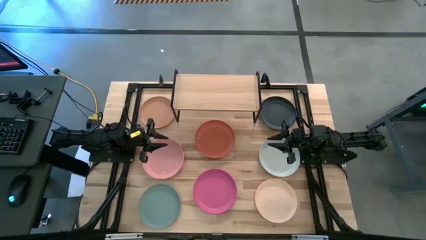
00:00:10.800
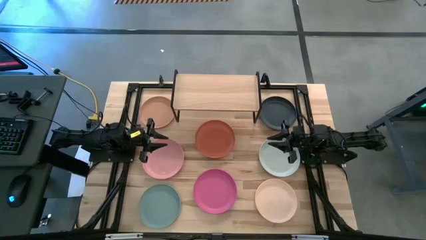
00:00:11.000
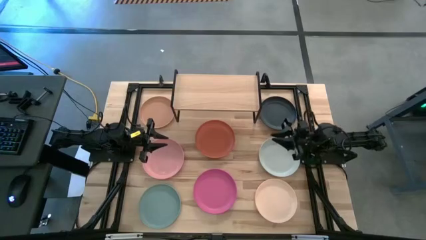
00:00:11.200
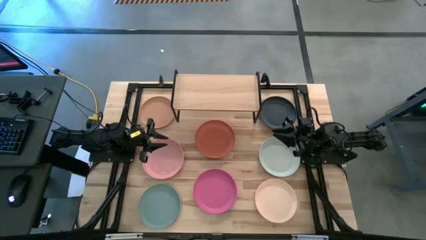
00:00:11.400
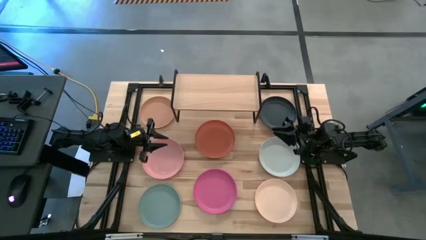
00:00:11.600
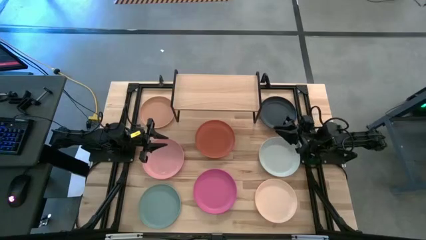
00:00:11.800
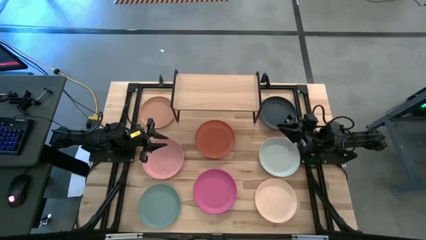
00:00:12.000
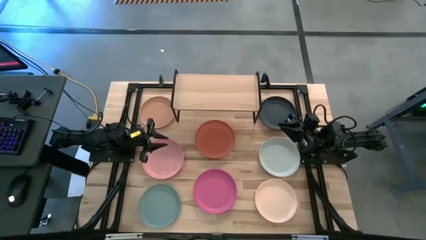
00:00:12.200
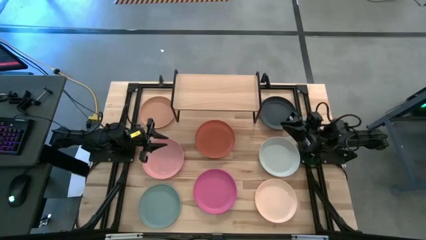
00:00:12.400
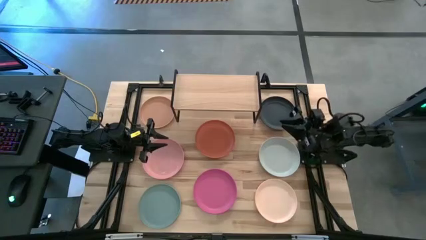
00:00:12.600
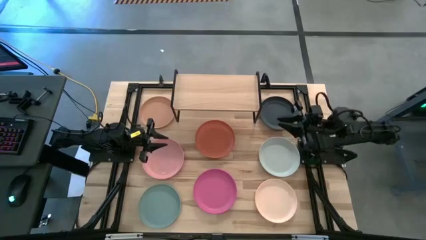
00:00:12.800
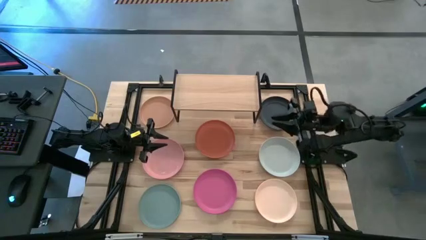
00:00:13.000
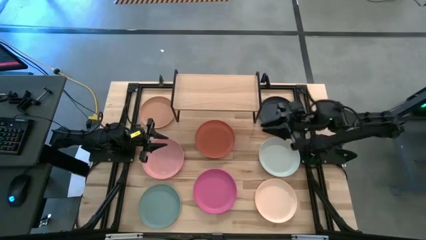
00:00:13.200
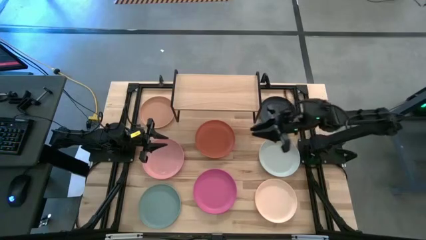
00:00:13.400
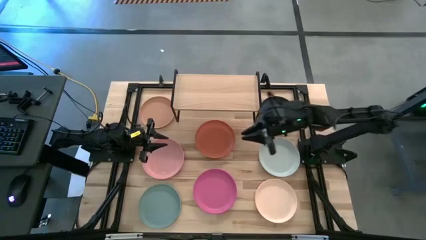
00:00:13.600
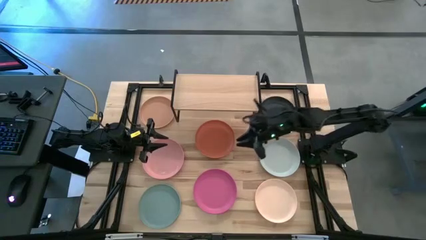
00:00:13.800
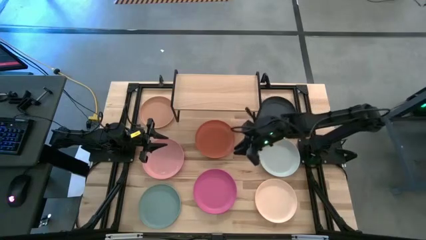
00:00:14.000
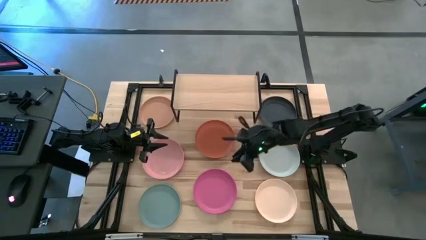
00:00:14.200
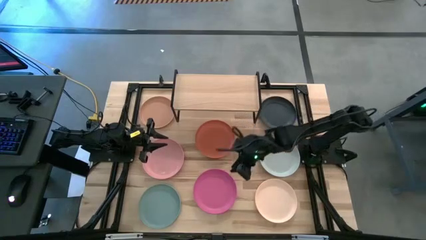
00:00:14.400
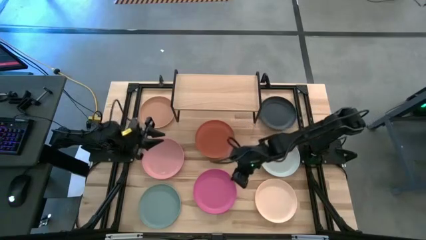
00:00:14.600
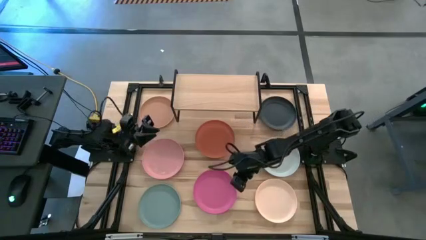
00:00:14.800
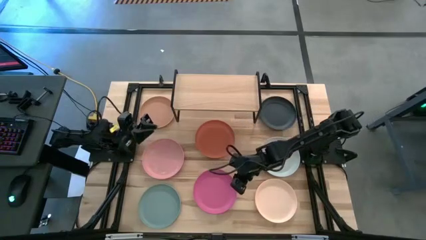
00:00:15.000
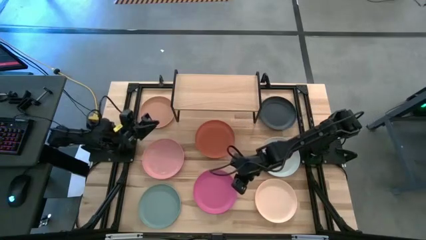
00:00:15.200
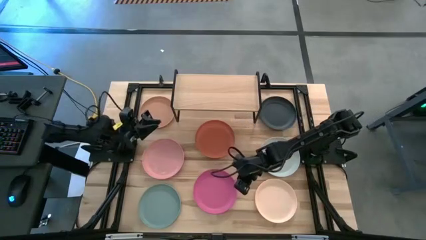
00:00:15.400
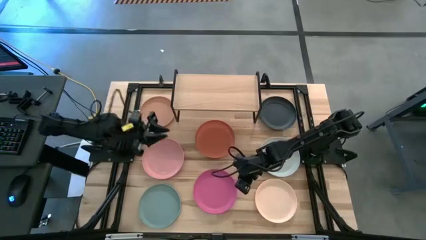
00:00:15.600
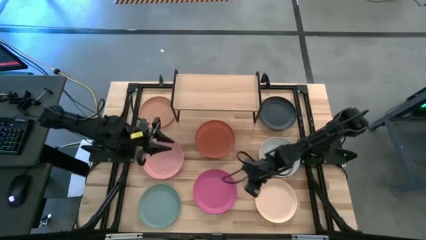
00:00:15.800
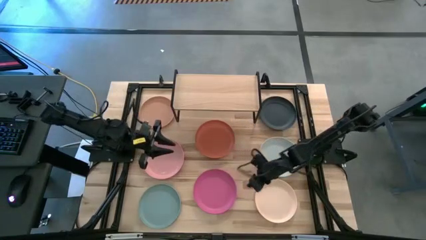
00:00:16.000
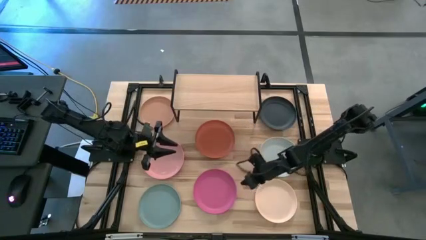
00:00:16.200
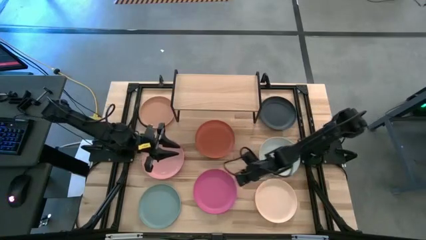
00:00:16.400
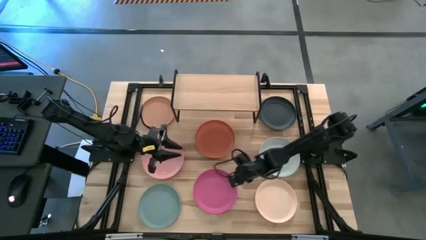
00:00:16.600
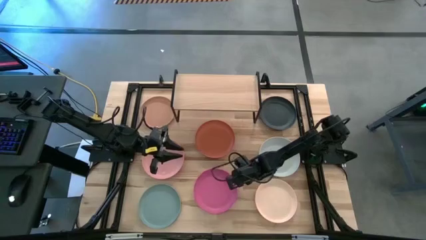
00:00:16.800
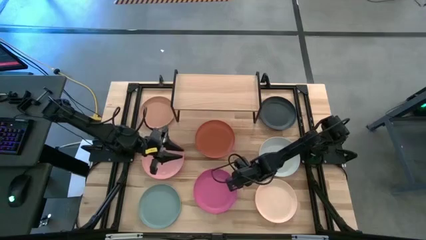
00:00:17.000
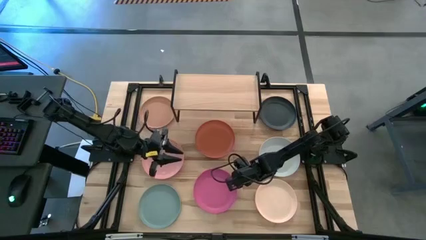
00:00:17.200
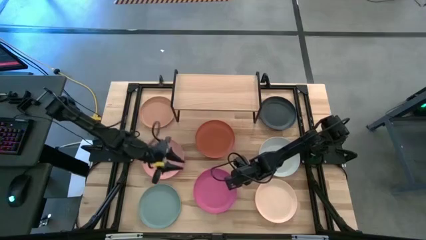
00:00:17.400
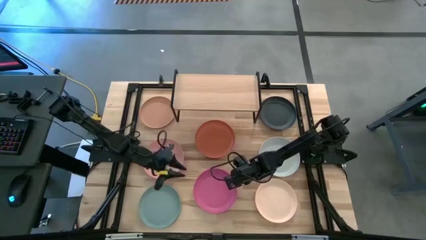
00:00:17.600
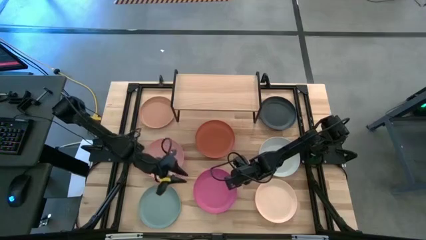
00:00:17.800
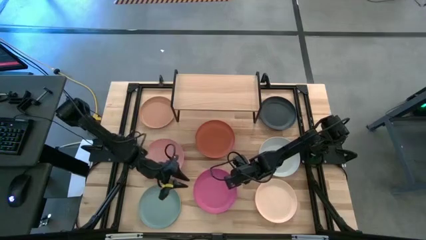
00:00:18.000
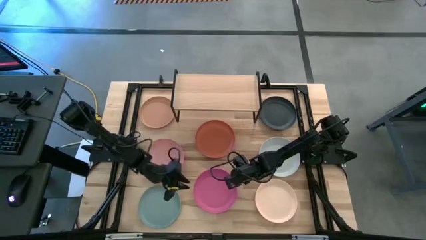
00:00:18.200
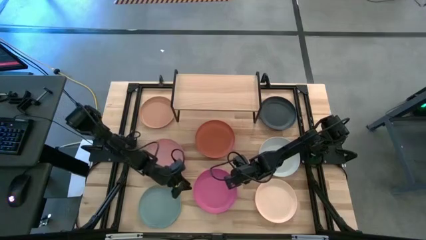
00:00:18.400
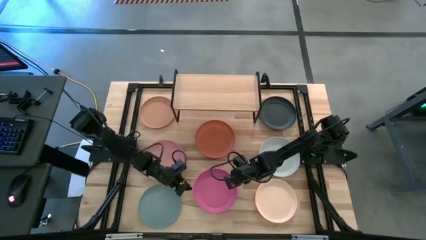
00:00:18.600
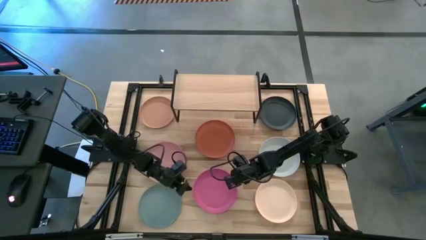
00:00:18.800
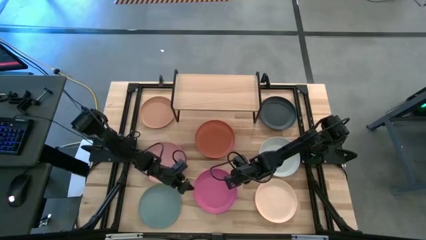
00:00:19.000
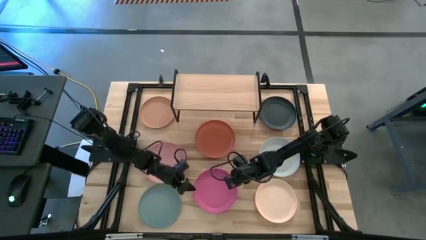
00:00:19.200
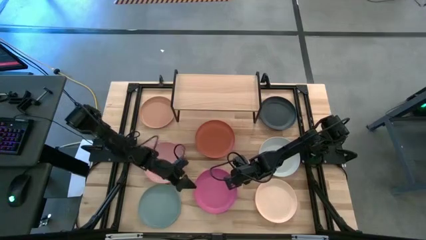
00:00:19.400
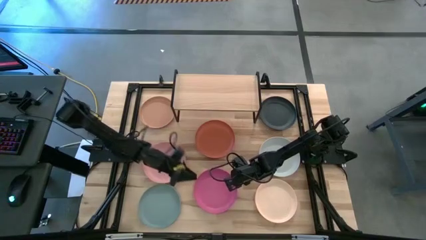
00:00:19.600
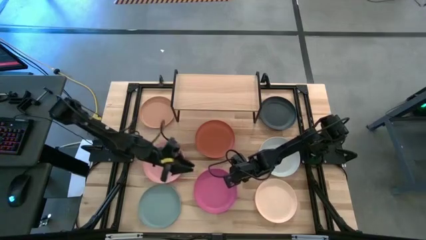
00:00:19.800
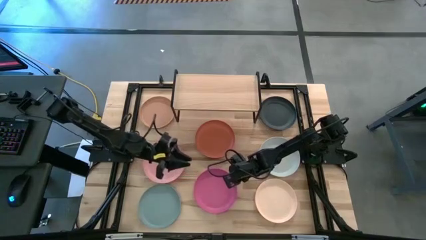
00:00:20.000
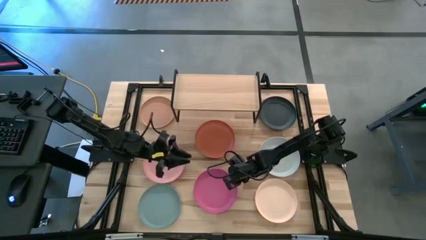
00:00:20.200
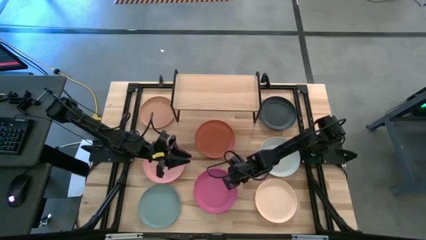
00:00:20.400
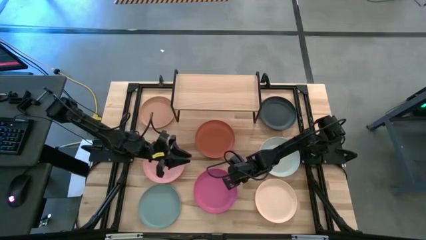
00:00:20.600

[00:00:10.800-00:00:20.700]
Task: Place and stack plates onto a shelf
Put the pink plate on the shelf

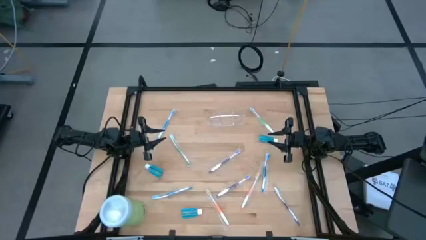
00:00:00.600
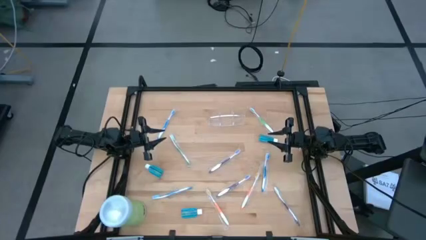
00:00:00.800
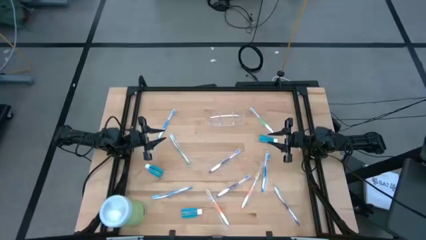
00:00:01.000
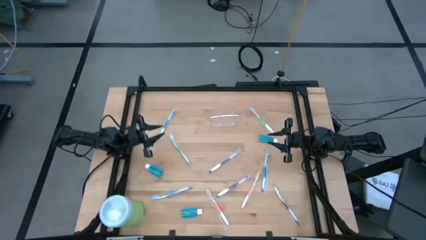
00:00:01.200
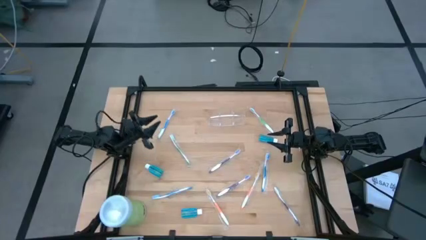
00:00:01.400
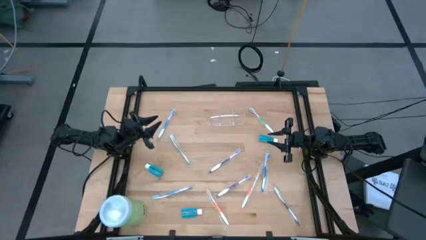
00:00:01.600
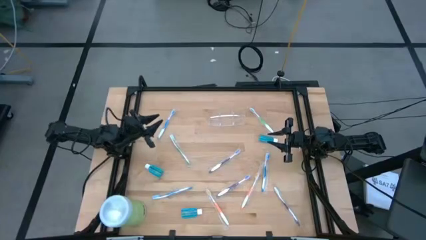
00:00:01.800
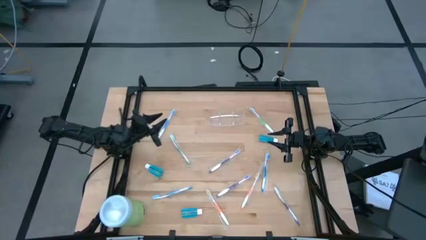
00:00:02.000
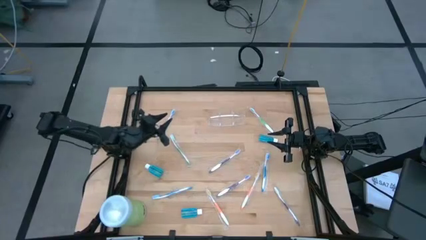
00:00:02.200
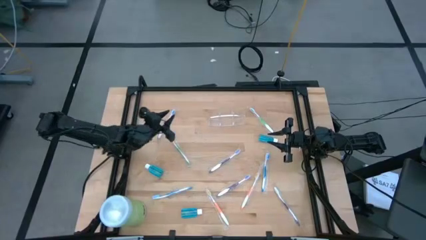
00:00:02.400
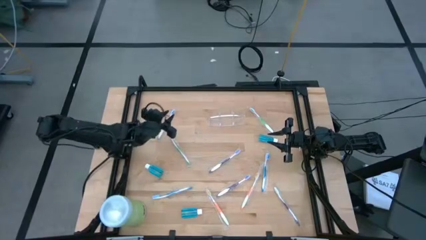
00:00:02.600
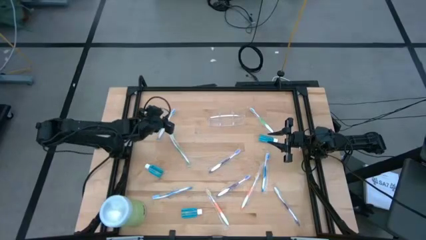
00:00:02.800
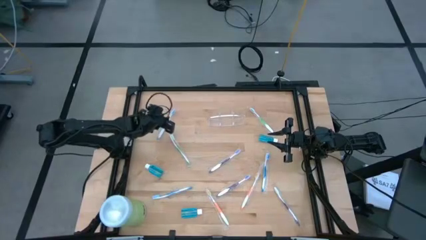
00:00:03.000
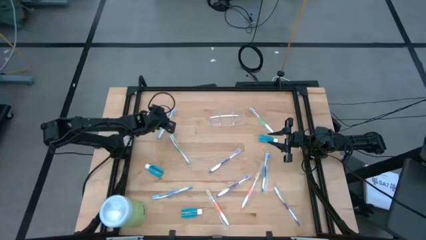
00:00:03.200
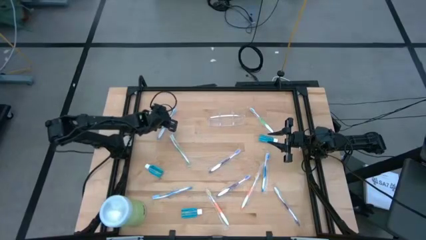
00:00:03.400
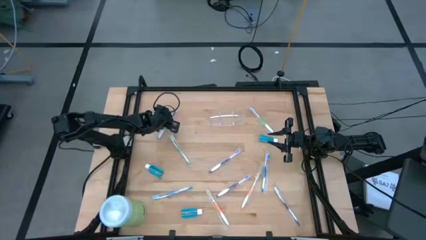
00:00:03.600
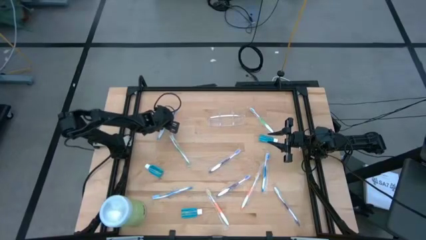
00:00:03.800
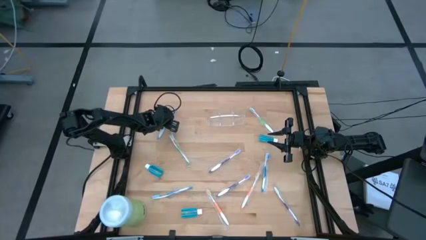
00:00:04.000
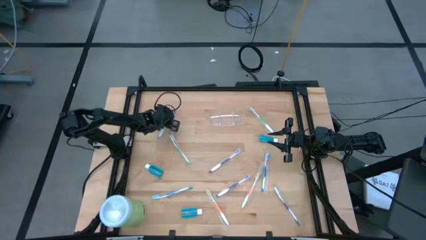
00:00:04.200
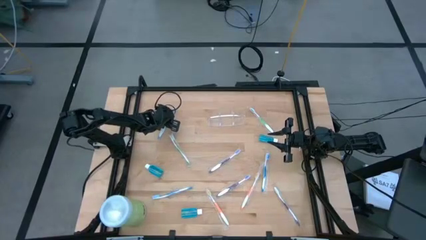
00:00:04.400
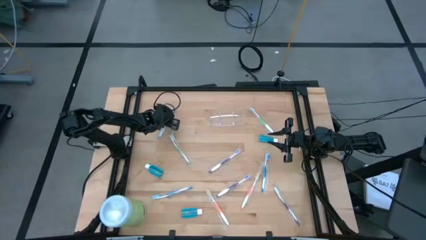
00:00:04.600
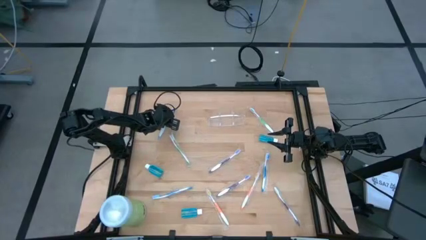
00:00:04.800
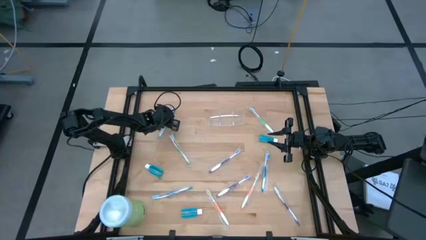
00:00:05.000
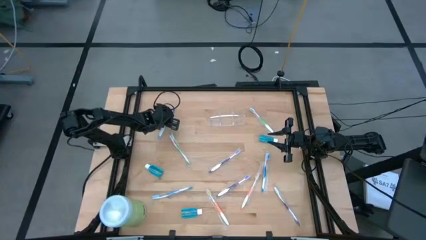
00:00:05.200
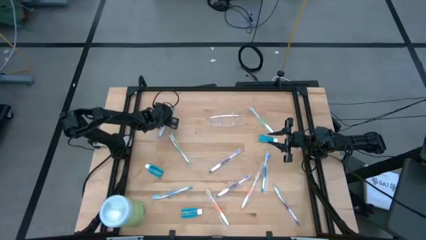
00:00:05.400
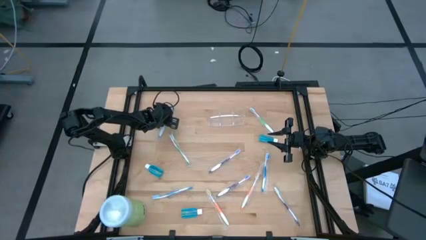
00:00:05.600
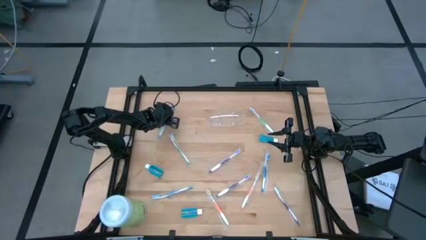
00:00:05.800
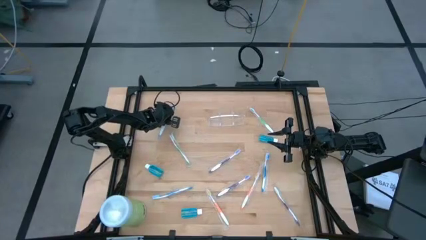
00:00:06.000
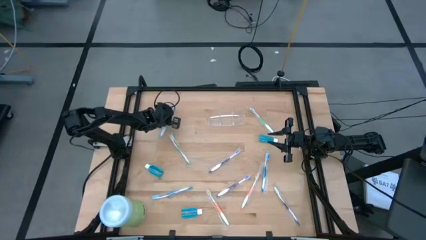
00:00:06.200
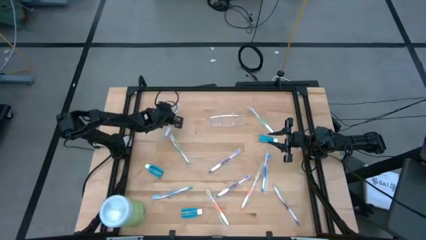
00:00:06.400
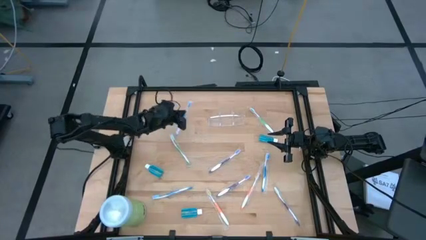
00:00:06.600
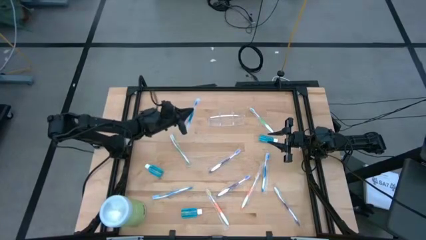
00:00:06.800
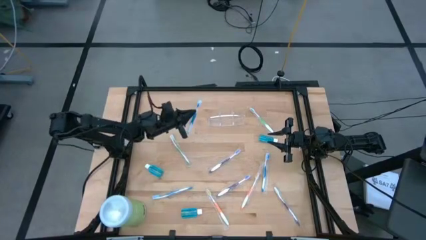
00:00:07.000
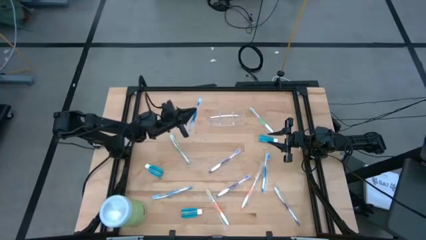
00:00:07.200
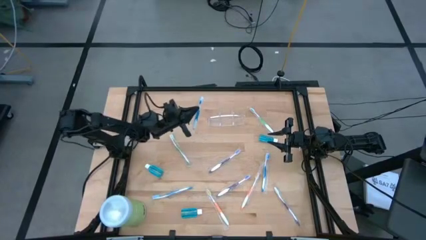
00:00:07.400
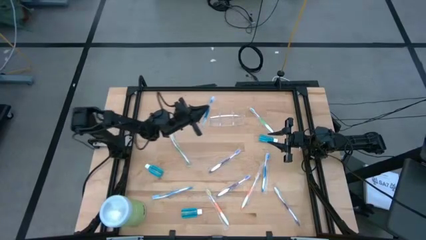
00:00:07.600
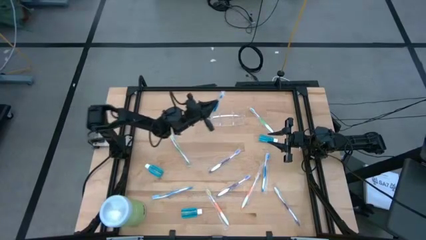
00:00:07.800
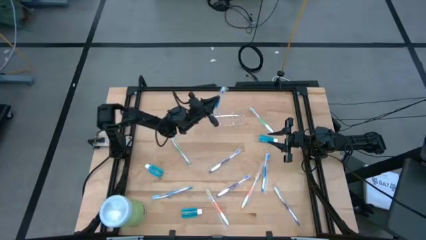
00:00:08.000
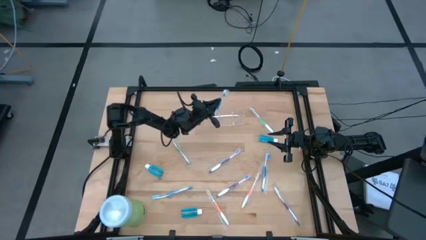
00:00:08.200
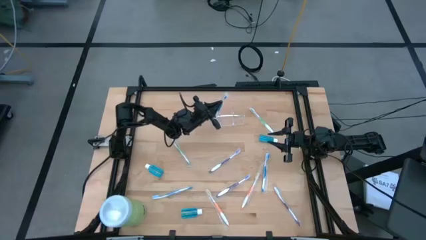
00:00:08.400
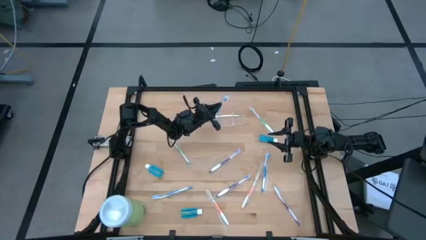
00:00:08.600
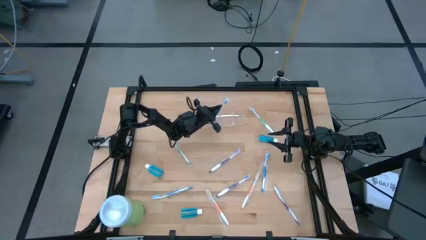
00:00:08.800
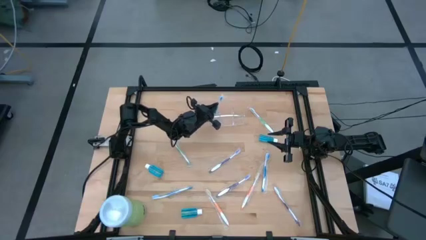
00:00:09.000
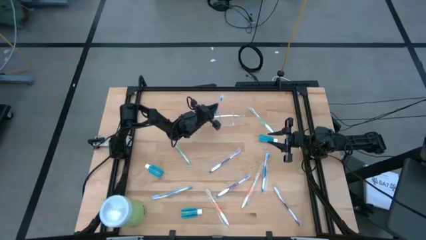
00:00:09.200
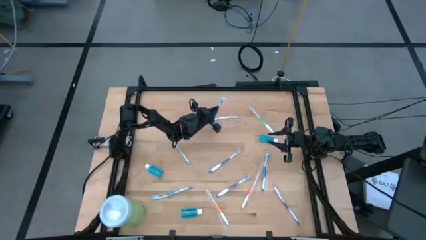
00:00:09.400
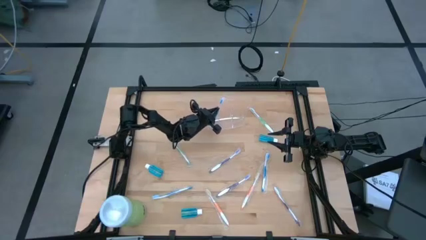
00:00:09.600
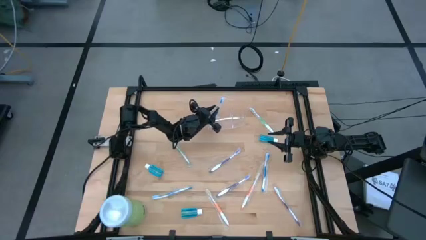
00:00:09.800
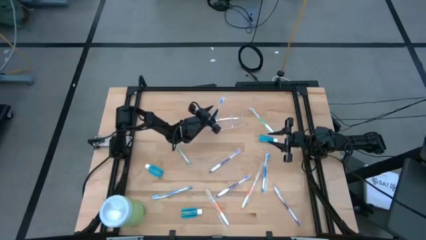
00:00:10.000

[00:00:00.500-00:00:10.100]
Task: Pick & Place toothbrushing station
Put the top blue toothbrush into the left section of the transparent organizer
